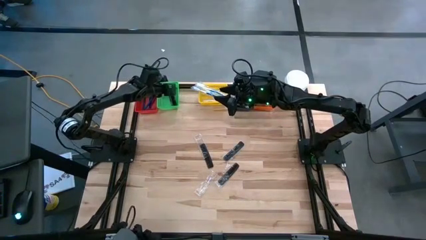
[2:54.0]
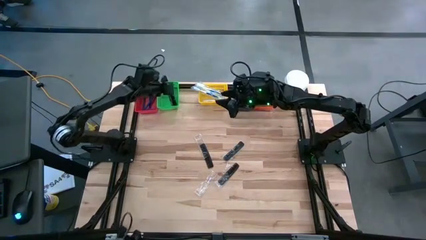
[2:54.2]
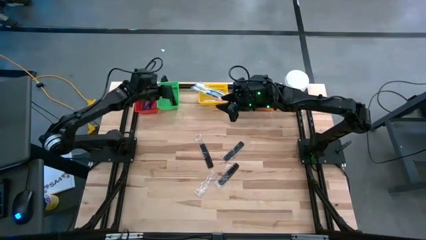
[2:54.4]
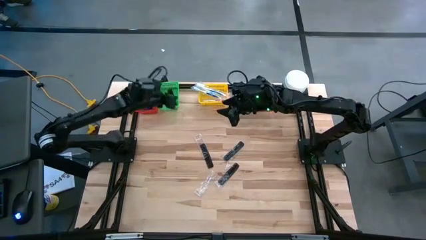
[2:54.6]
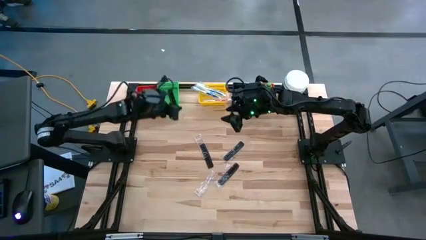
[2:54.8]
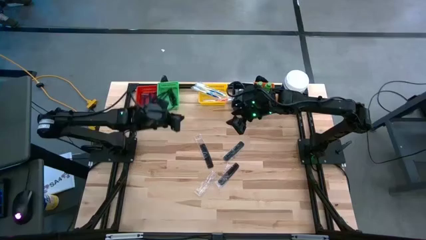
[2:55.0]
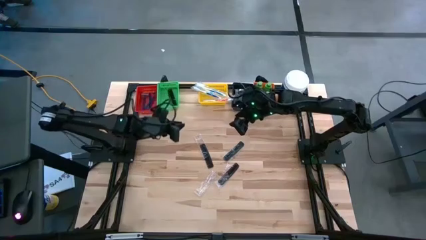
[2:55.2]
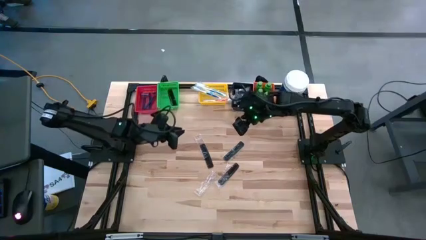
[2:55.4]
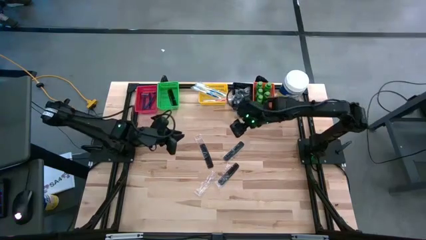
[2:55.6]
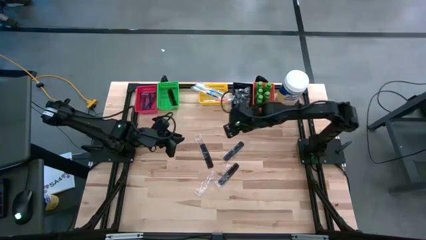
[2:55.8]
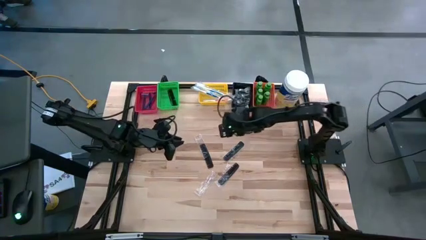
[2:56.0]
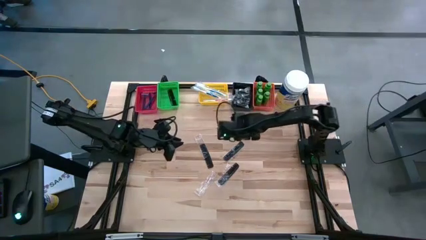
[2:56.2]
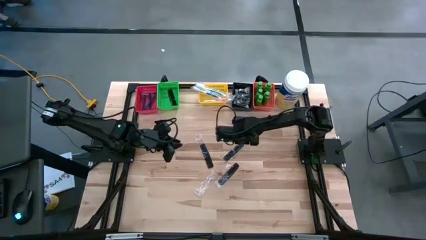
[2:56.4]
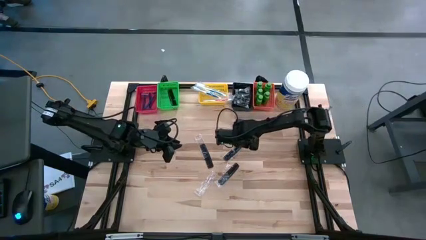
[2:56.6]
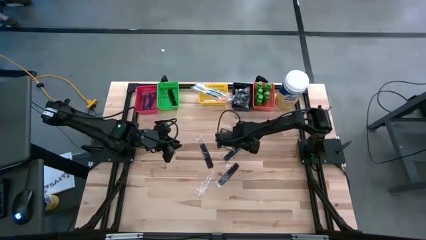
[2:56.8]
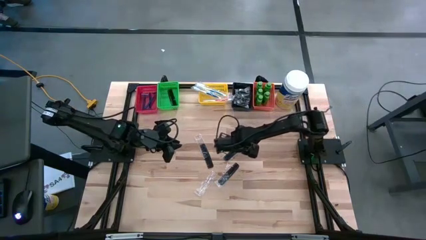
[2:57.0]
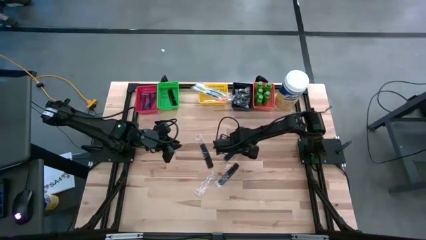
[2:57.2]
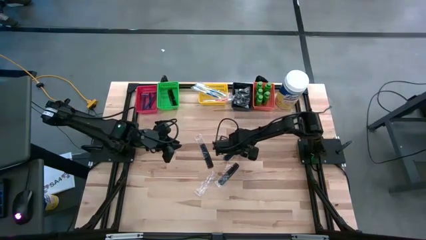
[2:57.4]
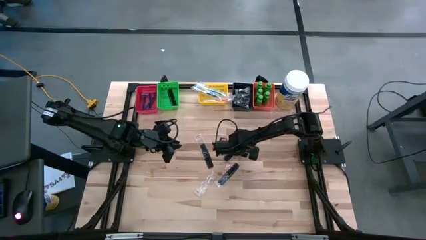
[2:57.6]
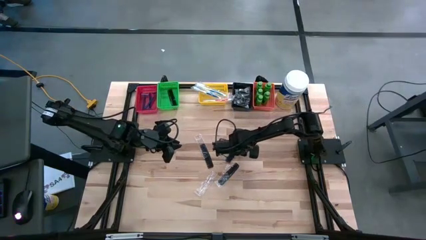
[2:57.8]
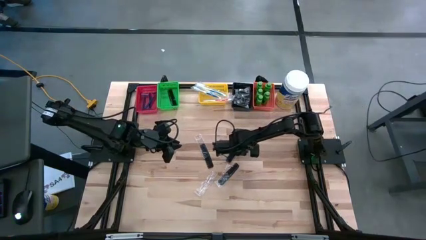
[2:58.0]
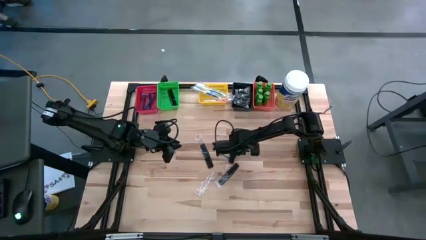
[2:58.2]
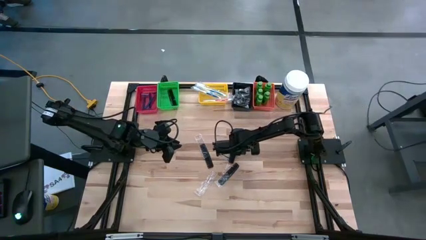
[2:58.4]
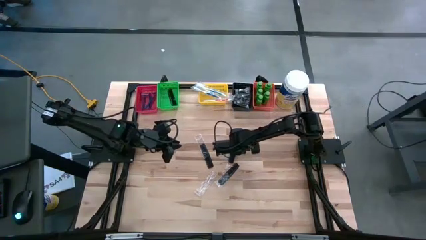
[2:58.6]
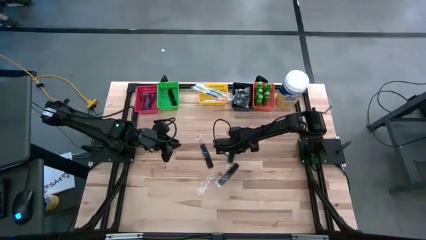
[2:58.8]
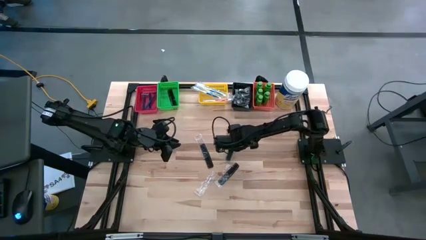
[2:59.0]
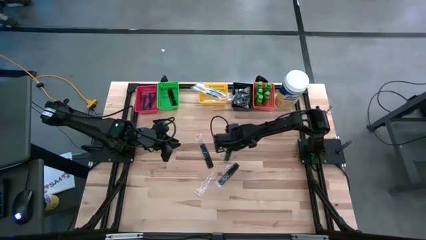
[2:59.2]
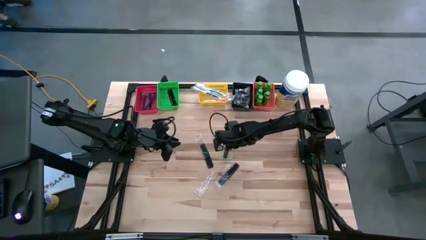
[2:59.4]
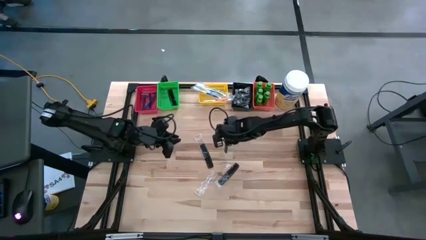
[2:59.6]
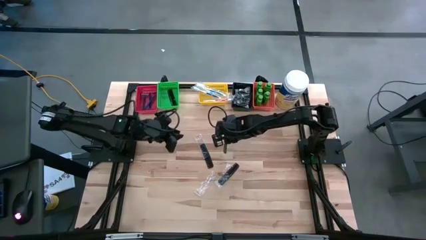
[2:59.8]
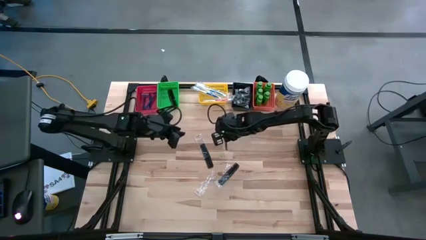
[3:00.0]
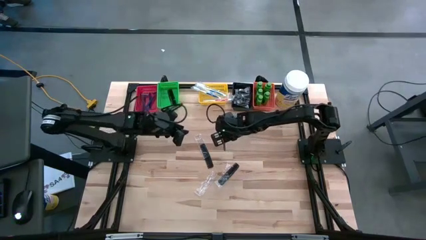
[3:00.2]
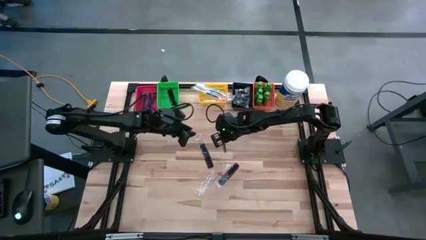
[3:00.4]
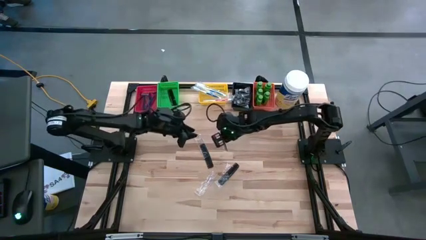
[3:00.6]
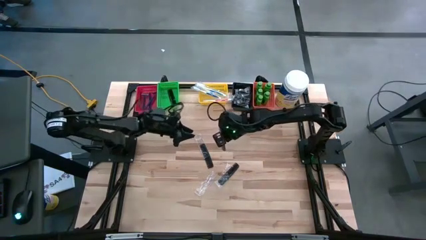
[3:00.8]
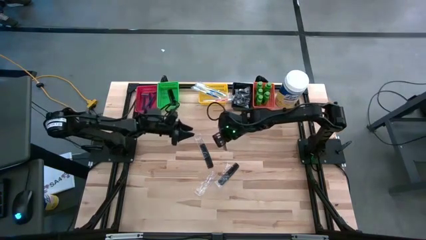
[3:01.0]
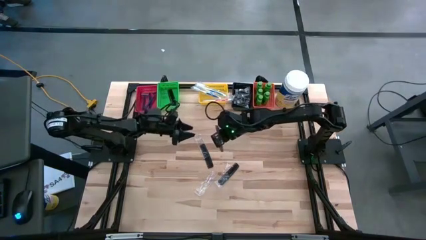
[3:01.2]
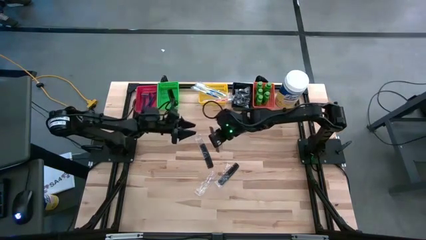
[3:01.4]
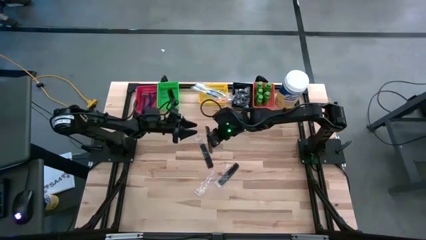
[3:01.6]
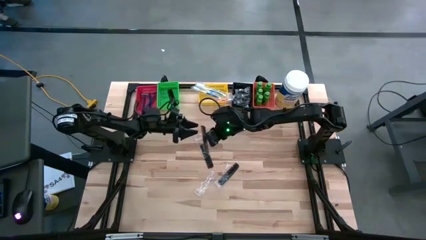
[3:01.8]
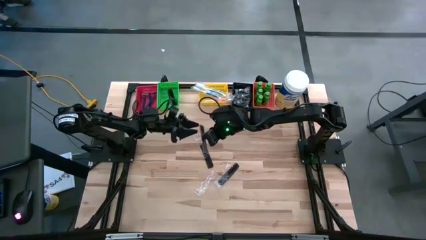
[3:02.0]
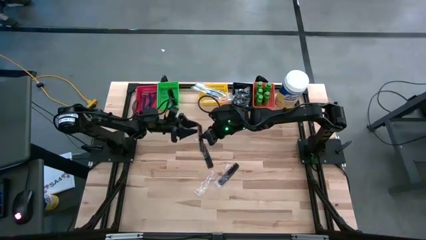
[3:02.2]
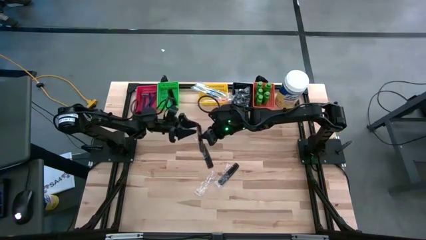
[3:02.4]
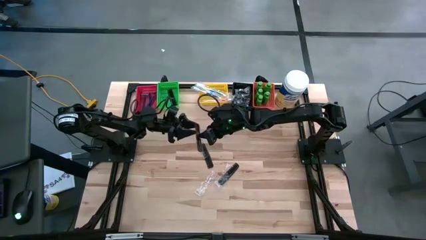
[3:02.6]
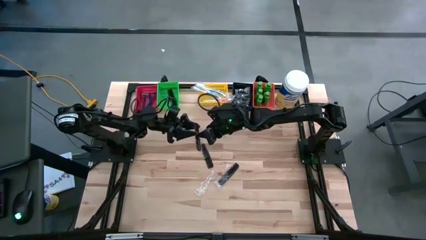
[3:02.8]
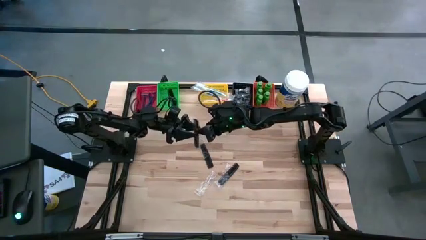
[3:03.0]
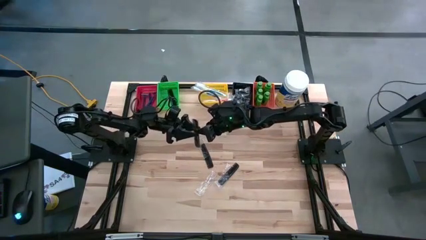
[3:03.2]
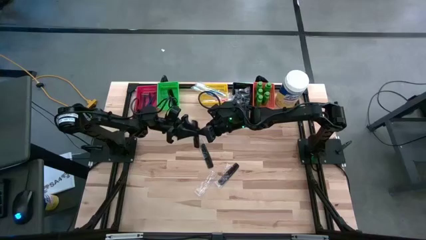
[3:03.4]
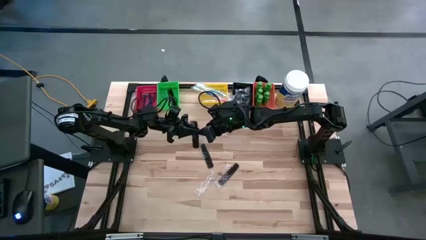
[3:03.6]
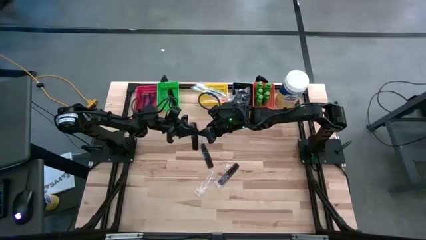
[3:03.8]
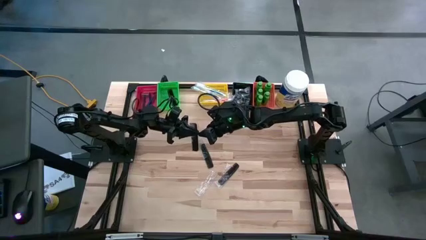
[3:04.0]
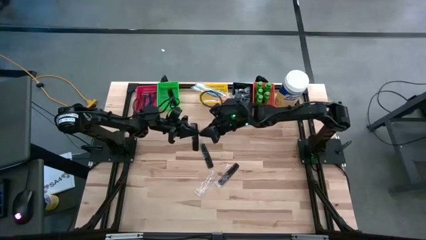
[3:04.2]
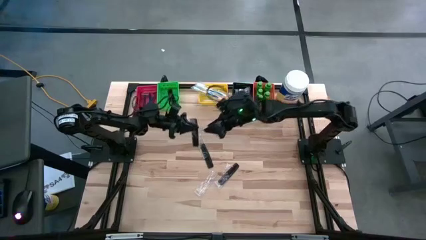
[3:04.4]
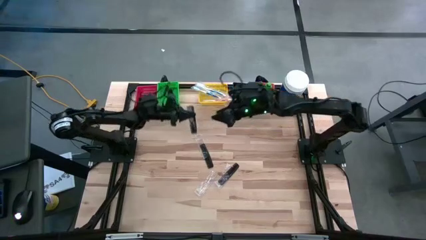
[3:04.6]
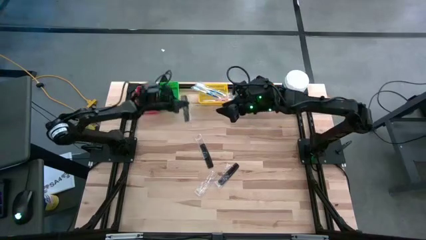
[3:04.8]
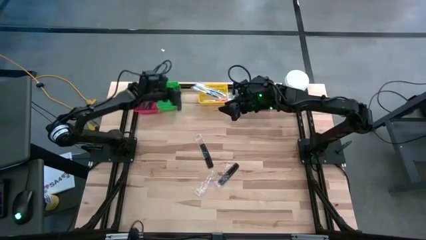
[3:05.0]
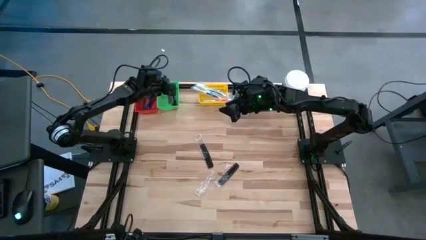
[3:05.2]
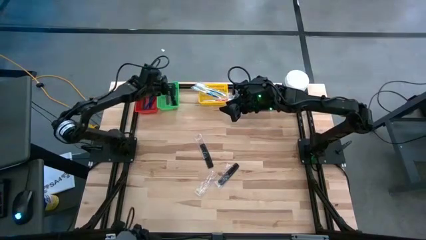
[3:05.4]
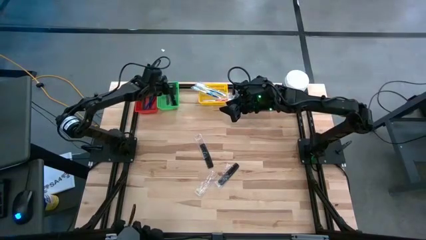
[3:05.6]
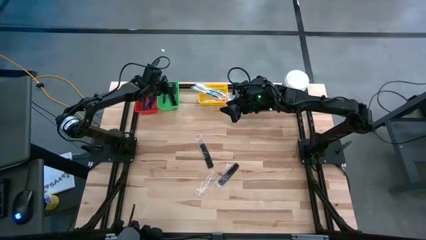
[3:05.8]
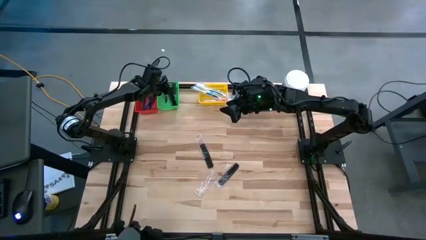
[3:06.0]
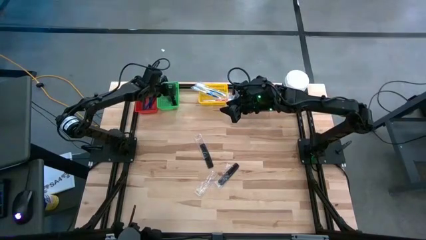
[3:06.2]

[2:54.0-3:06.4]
Task: Pick & Place Travel size toiletries
Put the black comb into the green bin

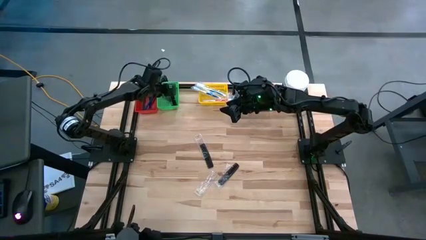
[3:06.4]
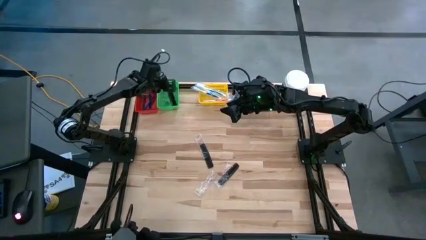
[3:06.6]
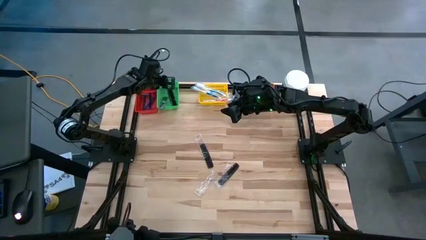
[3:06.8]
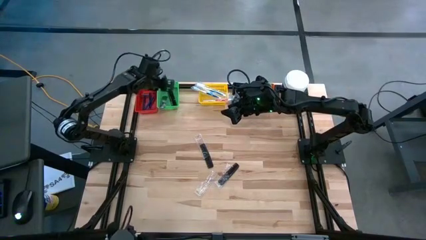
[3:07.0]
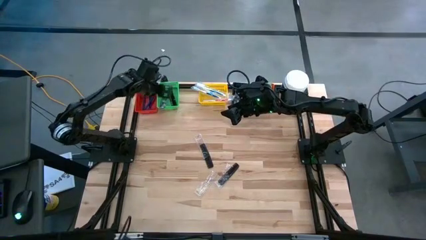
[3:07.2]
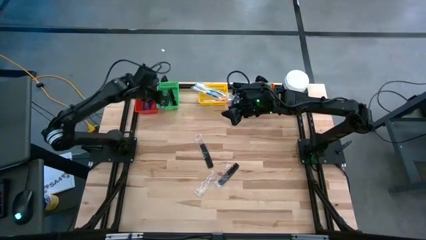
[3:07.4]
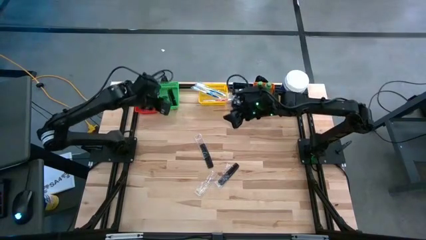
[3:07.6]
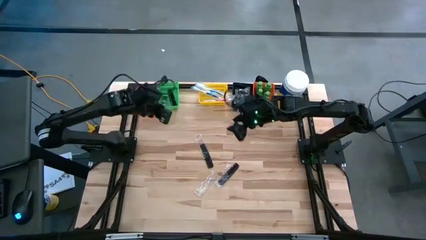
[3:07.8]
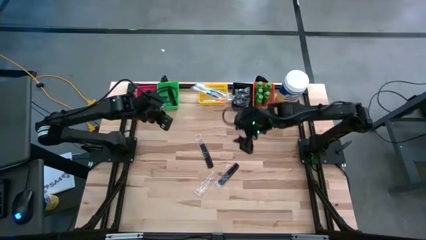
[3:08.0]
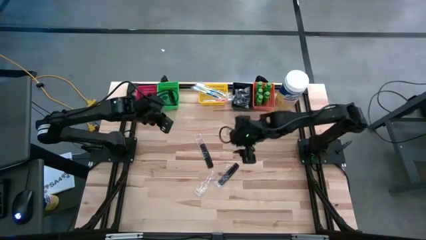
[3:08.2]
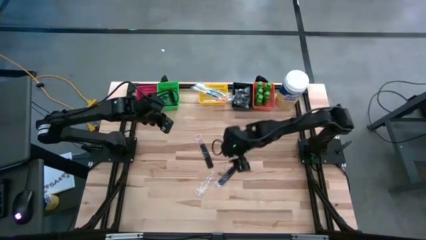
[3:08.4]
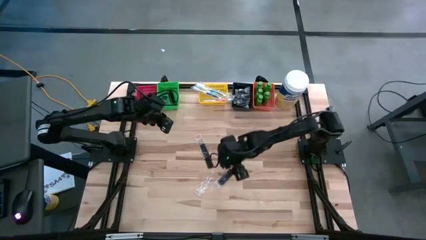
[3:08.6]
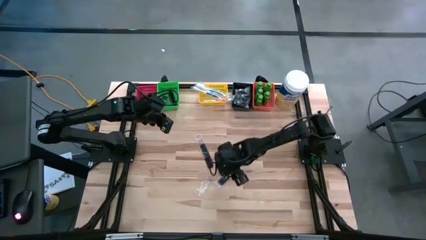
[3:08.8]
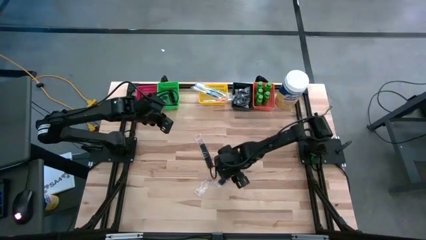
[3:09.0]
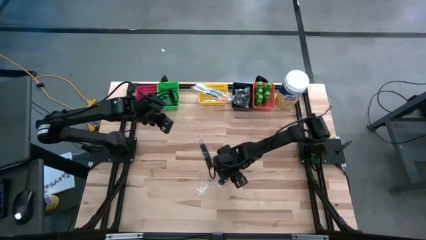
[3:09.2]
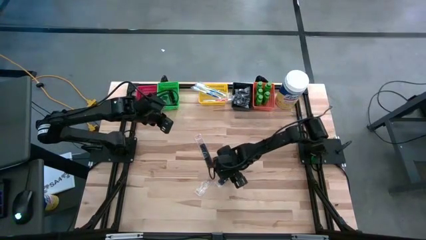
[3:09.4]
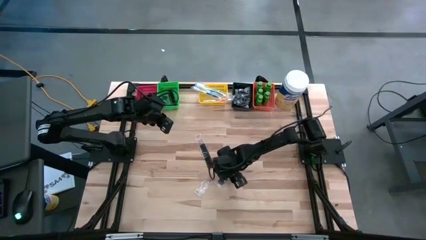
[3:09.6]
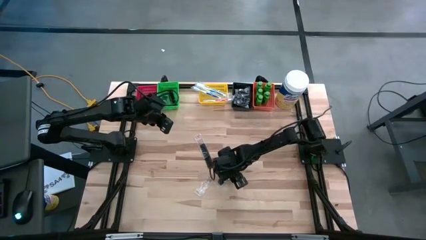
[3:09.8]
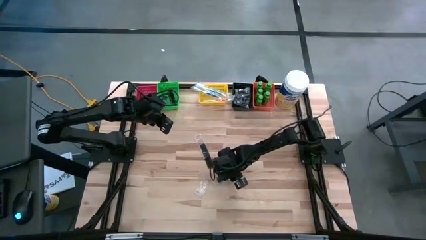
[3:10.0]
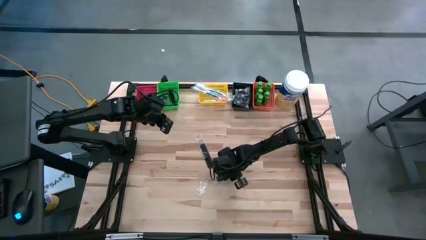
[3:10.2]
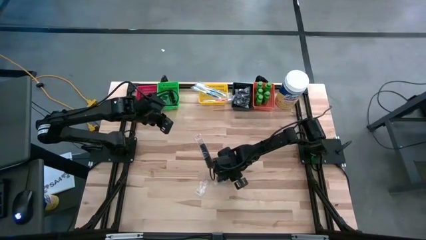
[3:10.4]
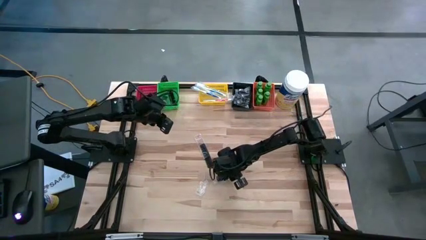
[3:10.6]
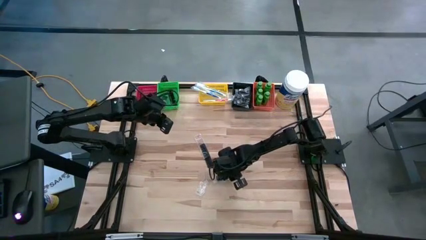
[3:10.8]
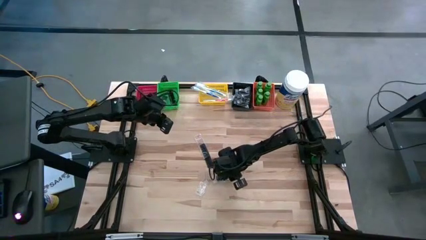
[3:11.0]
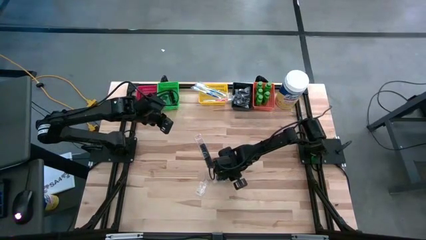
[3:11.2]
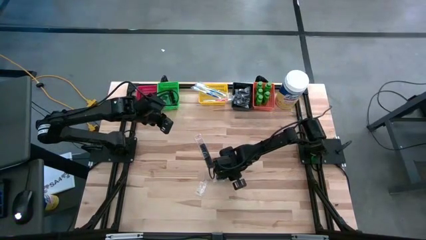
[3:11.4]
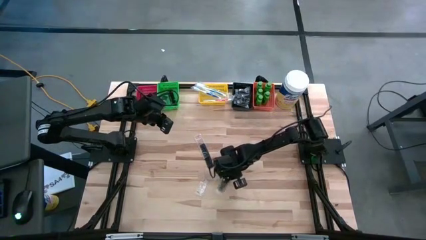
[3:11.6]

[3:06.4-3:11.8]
Put the black comb into the green bin
